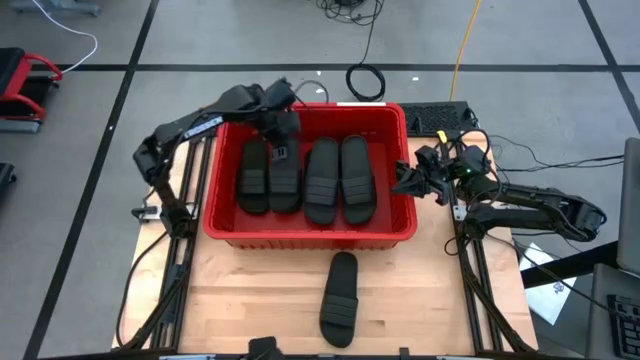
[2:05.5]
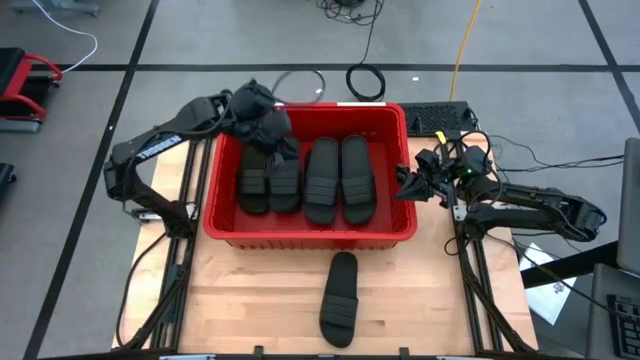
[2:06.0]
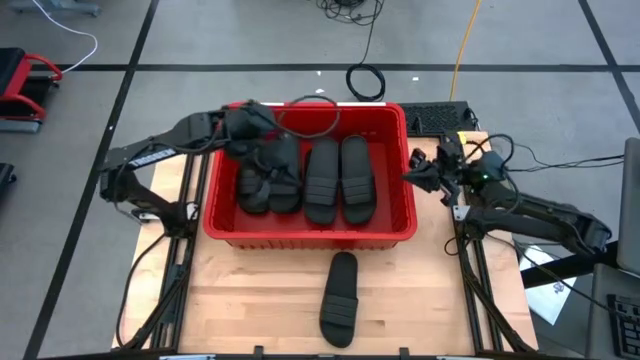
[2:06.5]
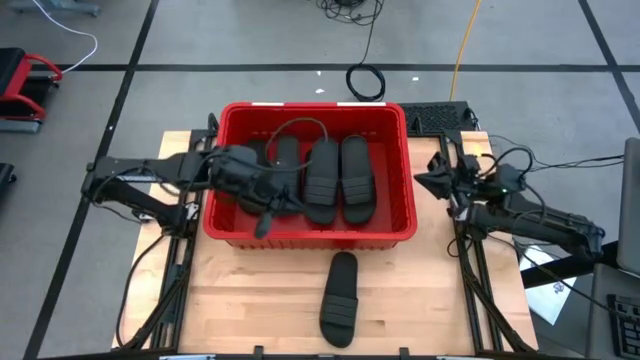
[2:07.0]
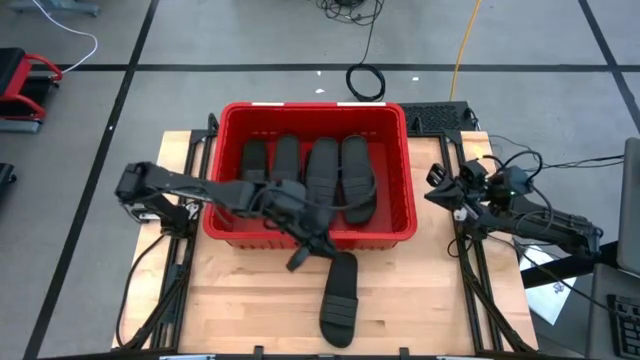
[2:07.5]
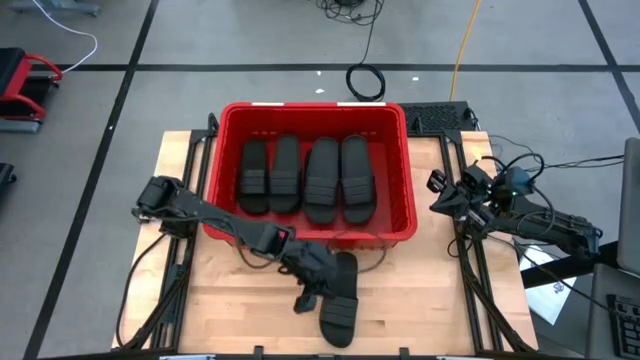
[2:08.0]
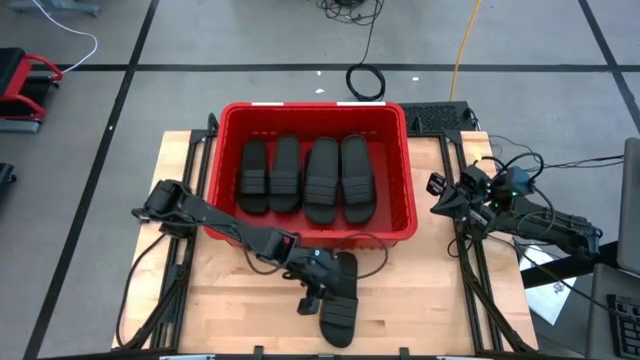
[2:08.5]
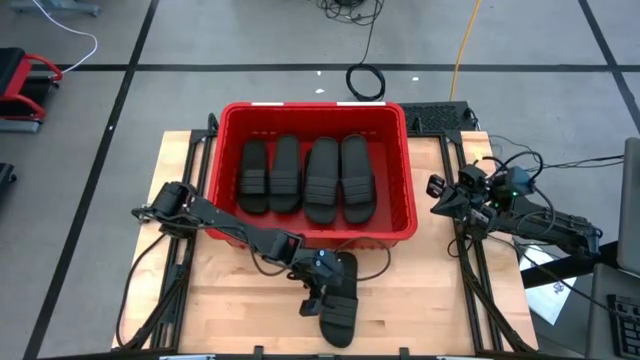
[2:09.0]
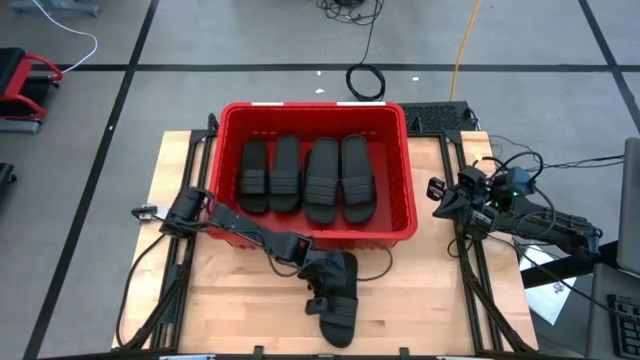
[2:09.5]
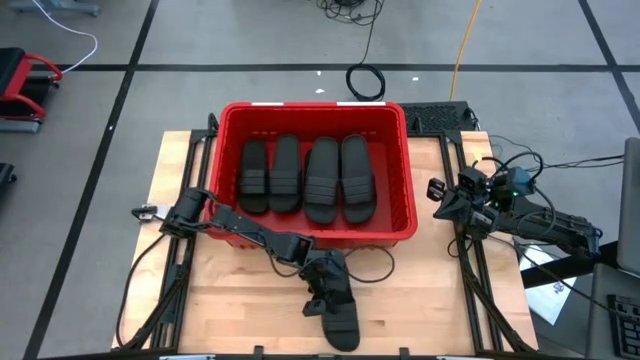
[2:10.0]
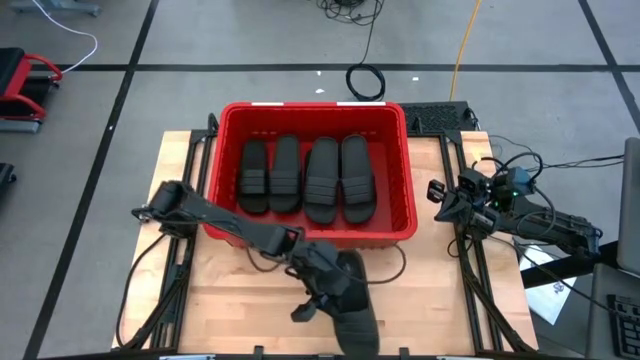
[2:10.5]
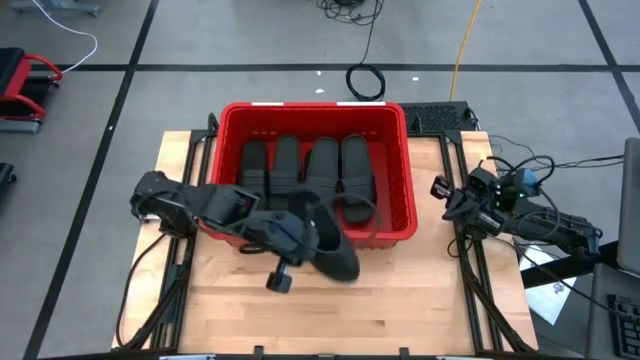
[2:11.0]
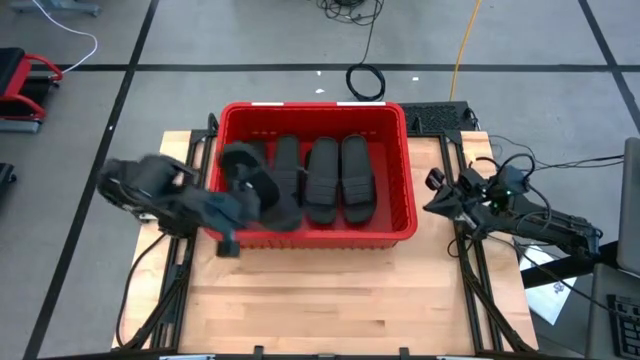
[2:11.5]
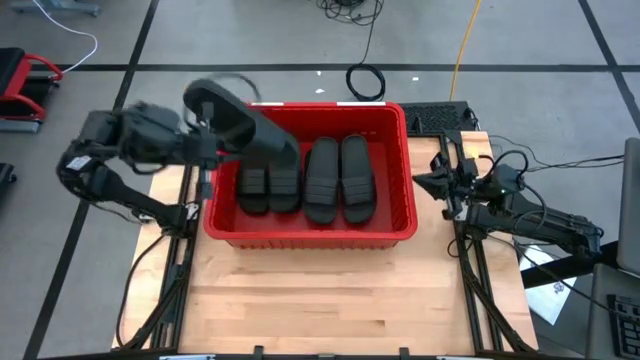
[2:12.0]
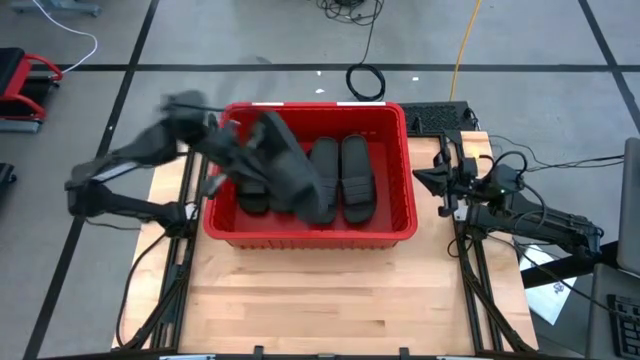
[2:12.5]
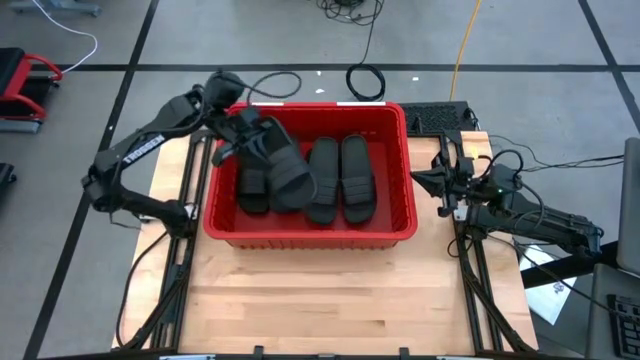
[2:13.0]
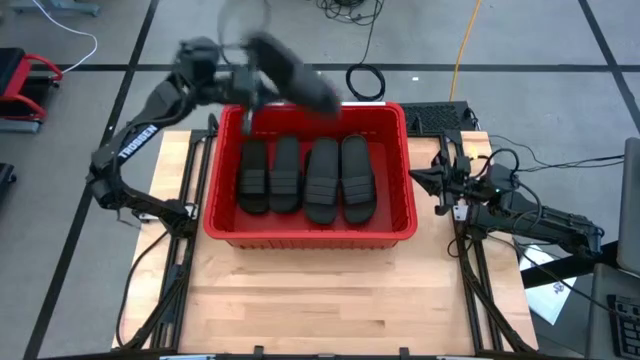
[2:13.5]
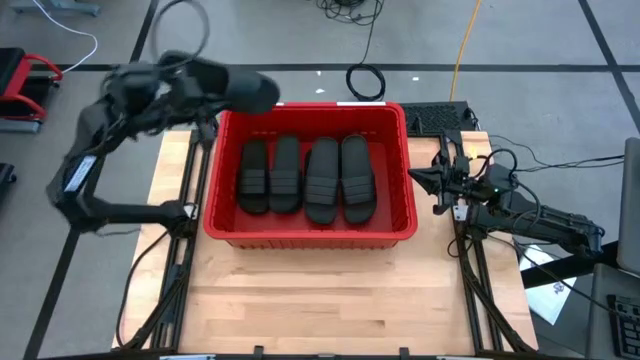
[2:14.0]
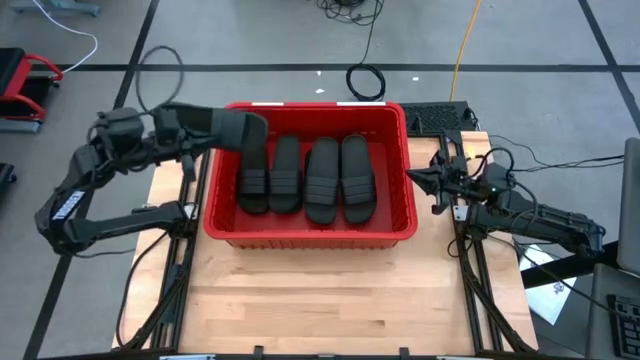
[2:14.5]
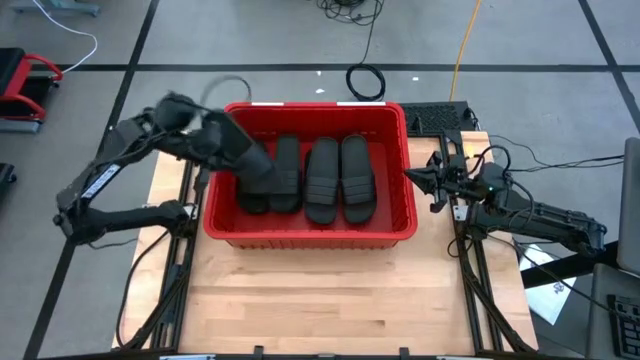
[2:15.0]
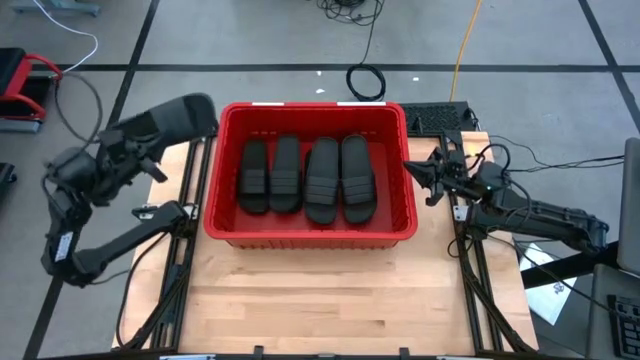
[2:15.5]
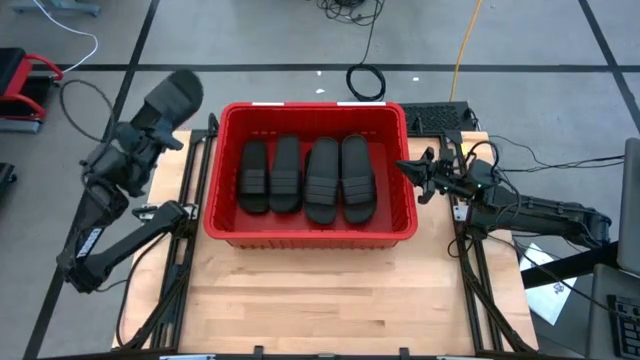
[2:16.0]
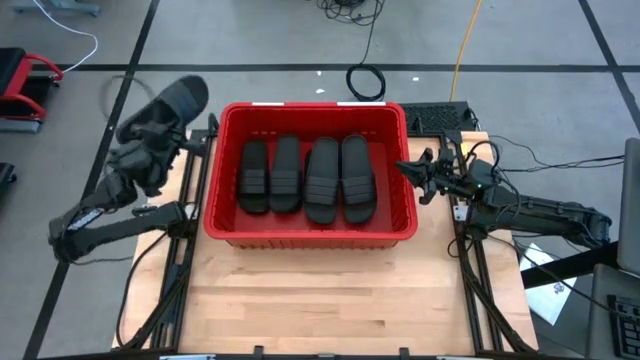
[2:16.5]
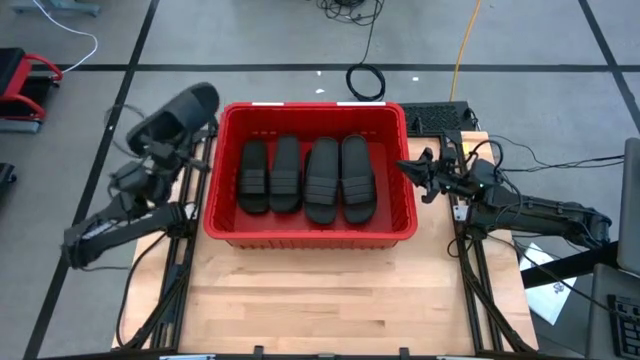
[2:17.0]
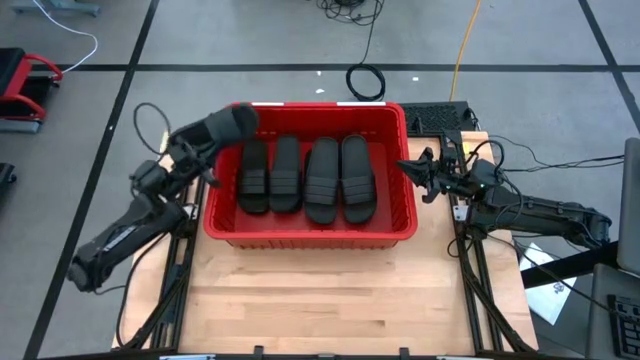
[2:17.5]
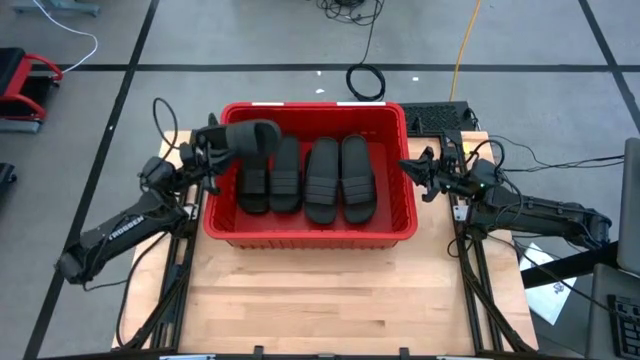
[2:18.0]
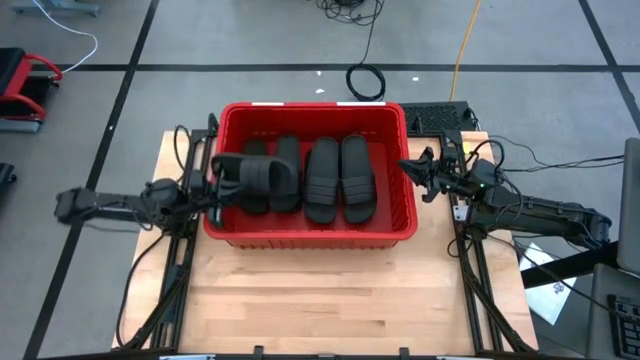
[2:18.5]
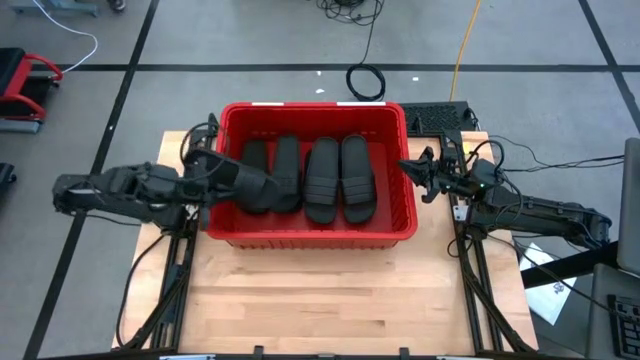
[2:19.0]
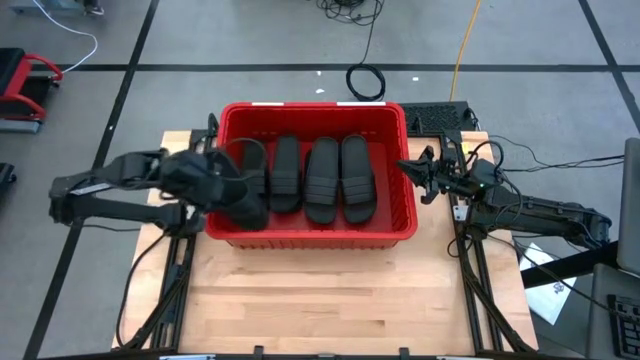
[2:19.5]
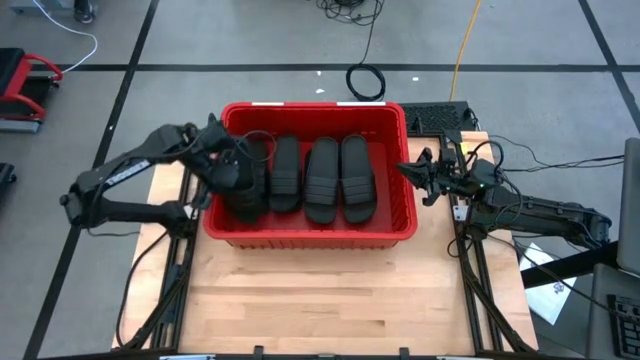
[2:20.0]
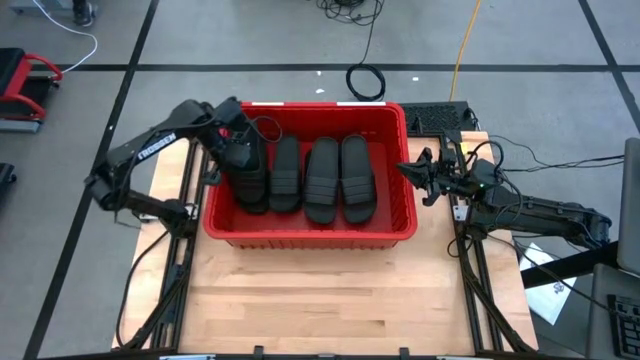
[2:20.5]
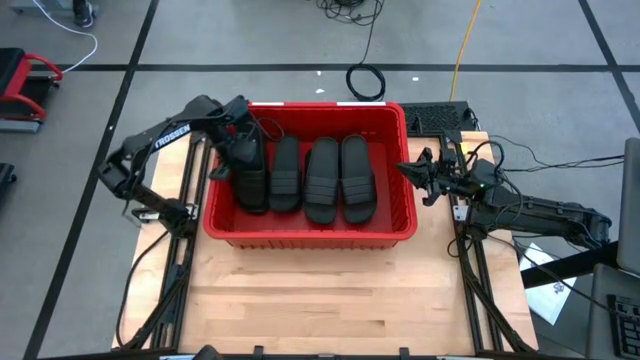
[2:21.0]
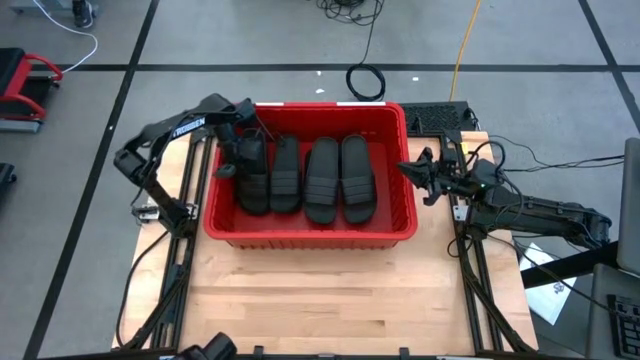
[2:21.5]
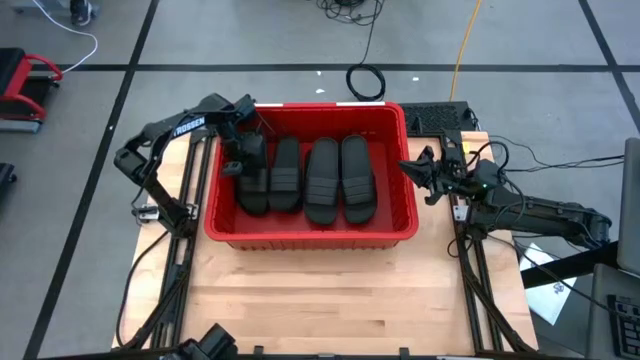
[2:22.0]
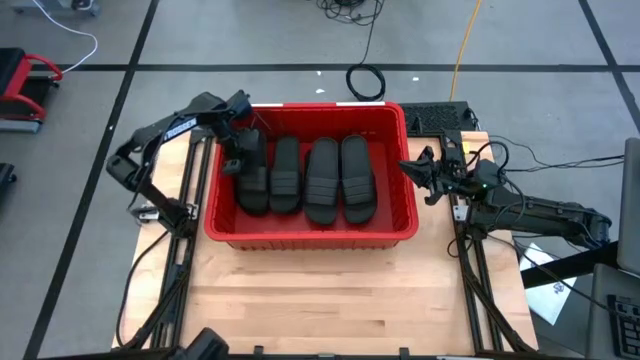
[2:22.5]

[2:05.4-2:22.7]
Task: Pick and place slides into bin
Put the slipper on top of the slipper inside the bin

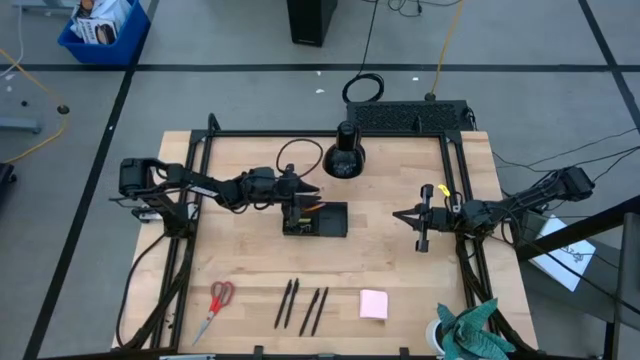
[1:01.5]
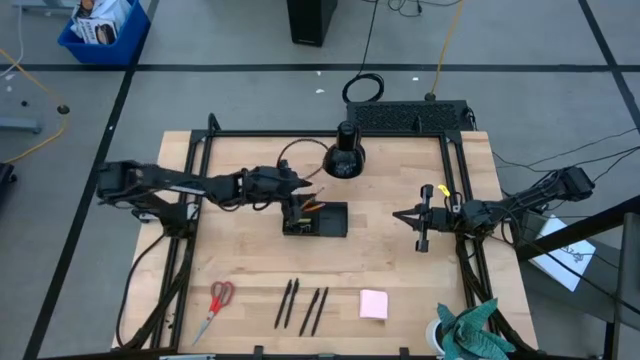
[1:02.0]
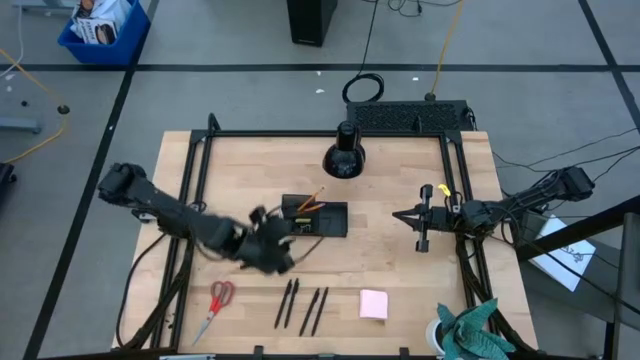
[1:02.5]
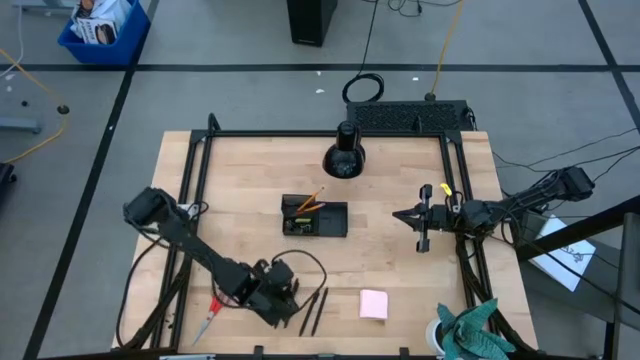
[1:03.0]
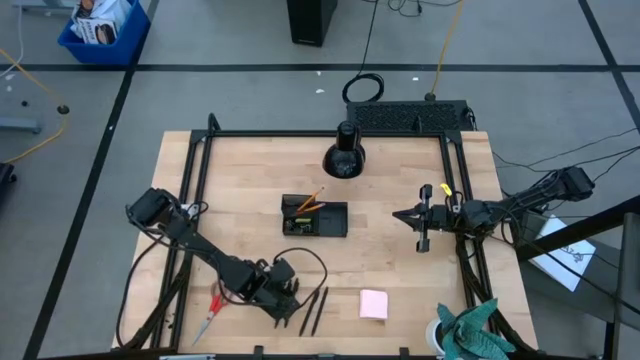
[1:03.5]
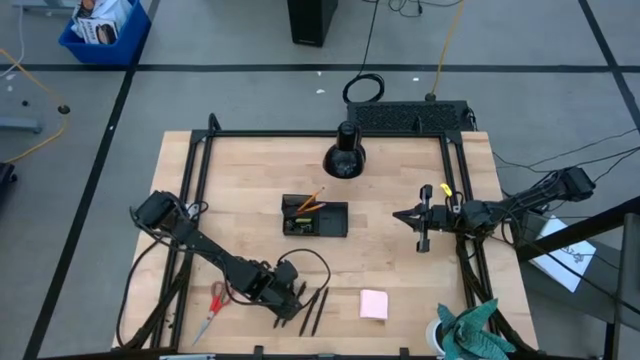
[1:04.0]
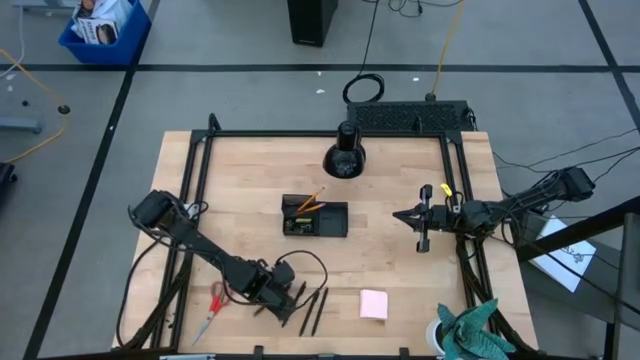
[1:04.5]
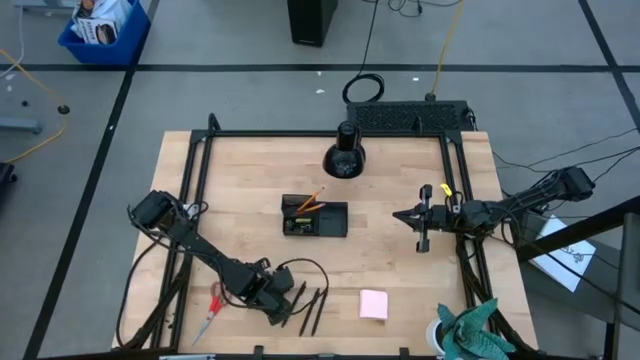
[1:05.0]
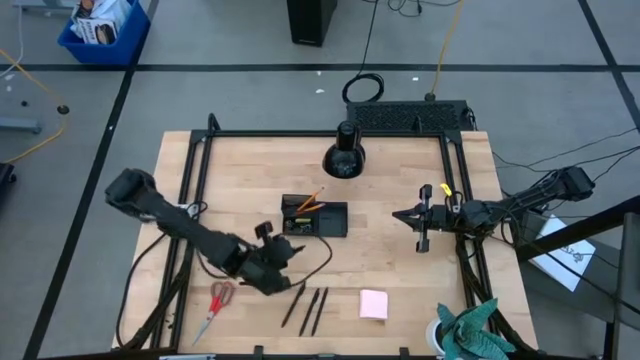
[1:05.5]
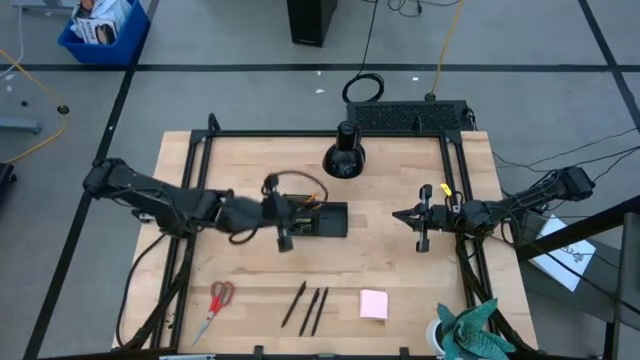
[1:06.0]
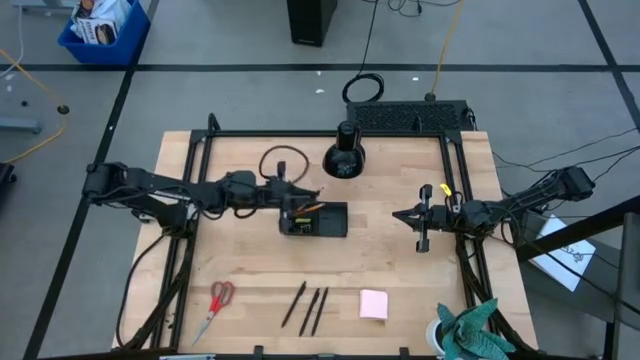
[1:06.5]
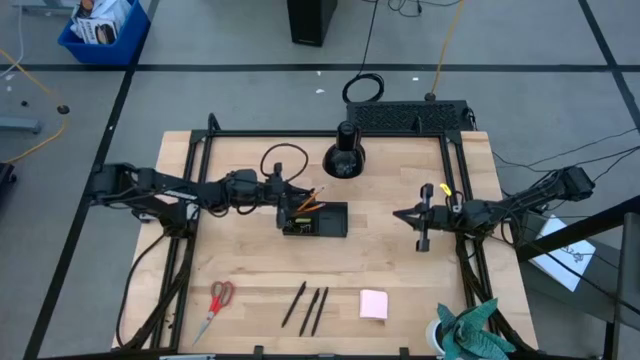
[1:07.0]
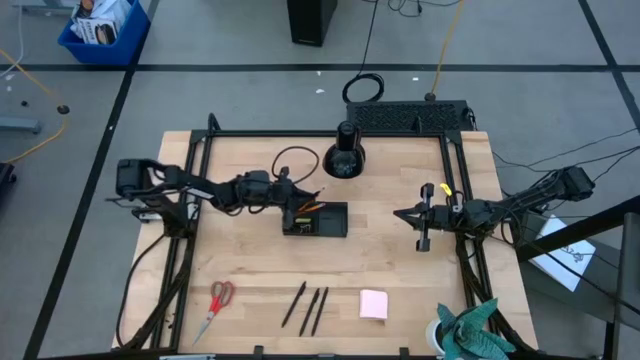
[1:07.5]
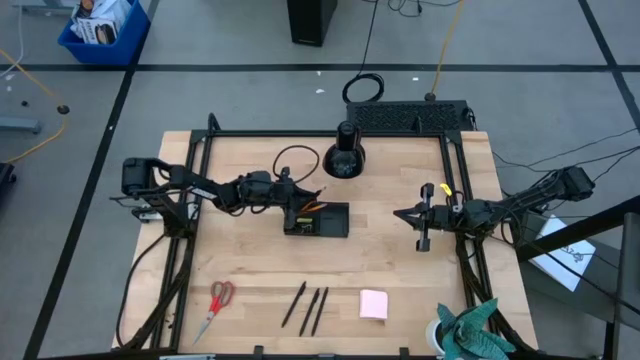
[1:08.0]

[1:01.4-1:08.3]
Task: Pick and place office supplies into organizer
Put the pen into the desk organizer
